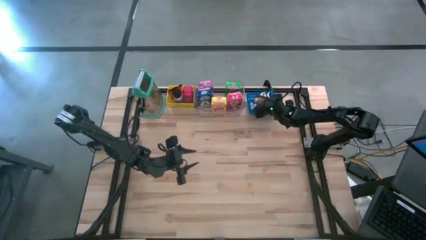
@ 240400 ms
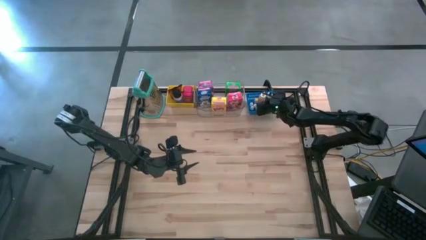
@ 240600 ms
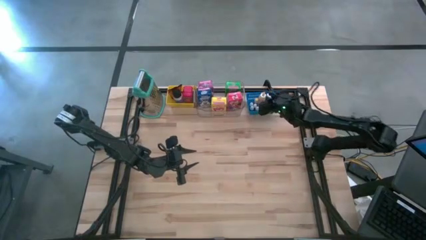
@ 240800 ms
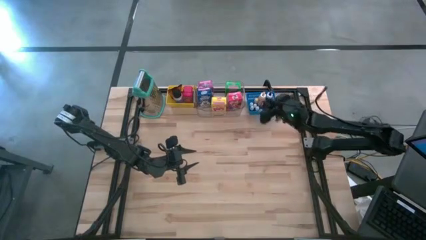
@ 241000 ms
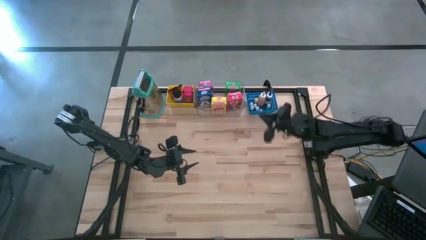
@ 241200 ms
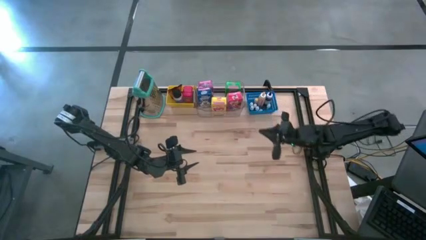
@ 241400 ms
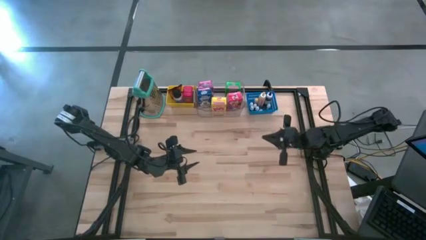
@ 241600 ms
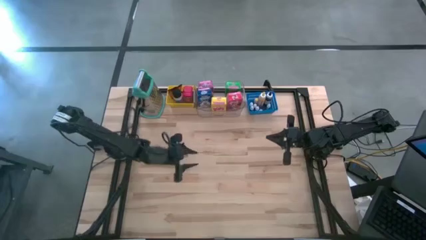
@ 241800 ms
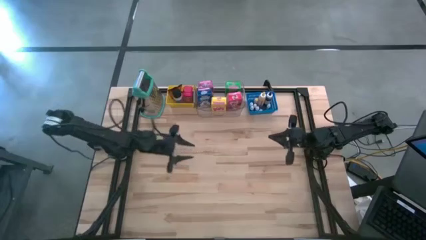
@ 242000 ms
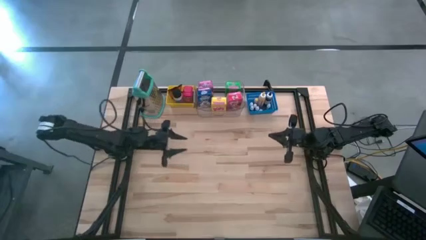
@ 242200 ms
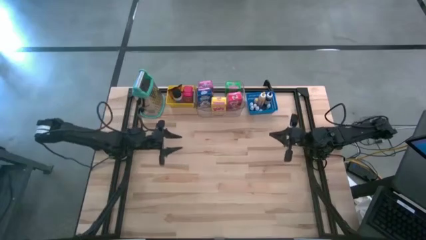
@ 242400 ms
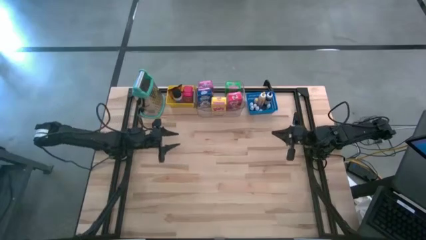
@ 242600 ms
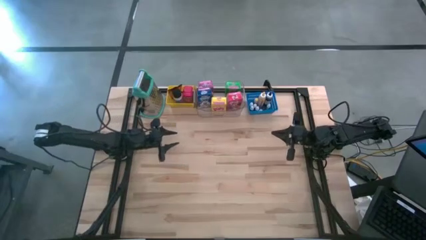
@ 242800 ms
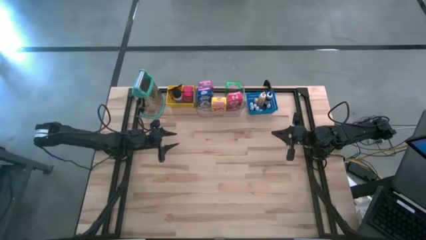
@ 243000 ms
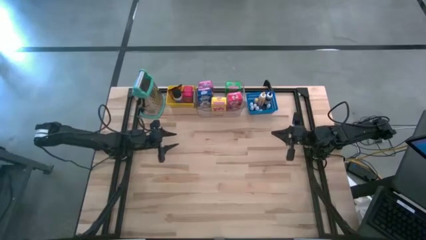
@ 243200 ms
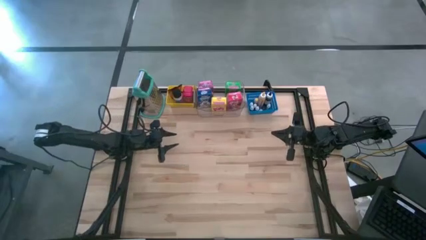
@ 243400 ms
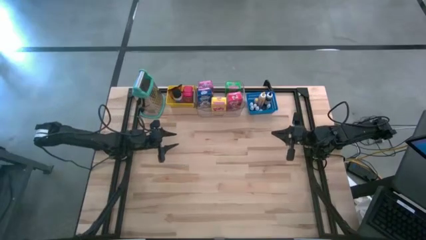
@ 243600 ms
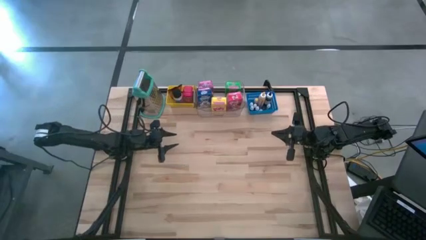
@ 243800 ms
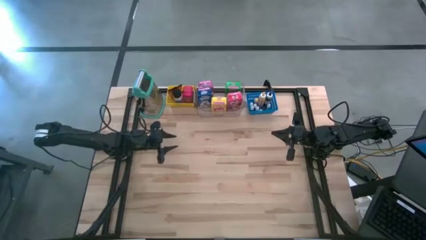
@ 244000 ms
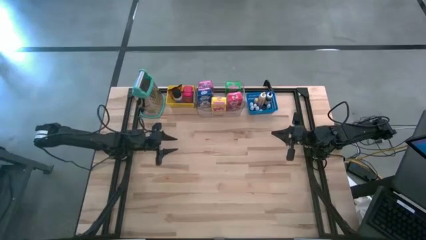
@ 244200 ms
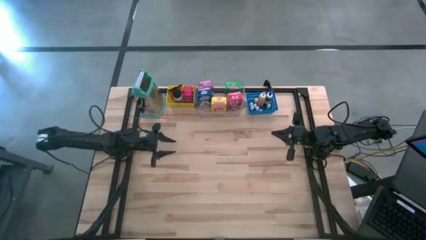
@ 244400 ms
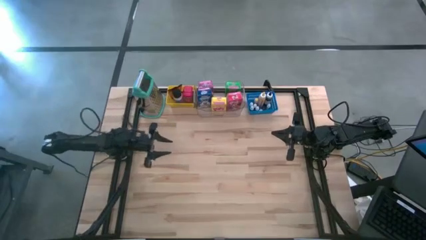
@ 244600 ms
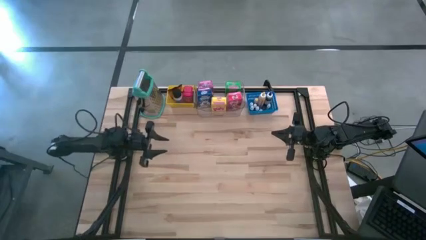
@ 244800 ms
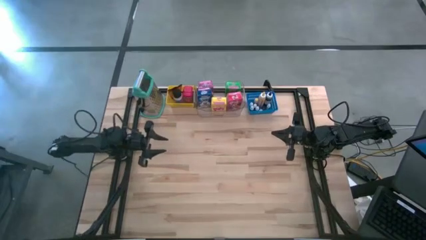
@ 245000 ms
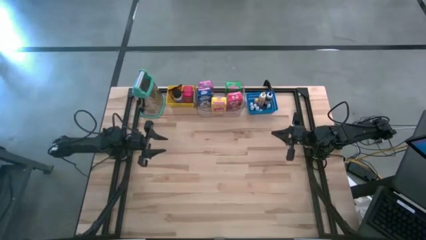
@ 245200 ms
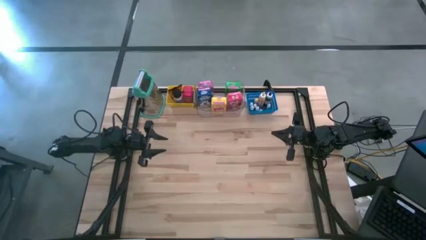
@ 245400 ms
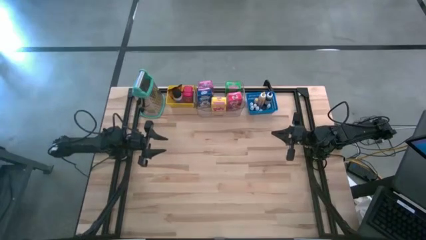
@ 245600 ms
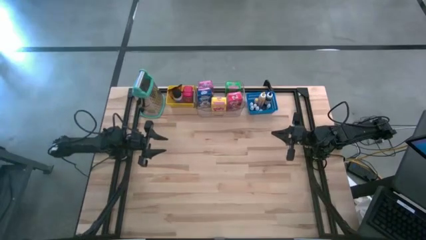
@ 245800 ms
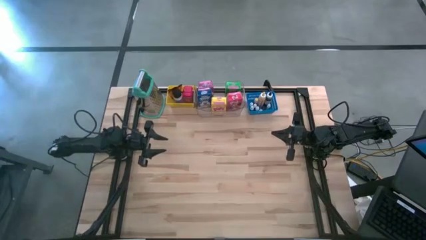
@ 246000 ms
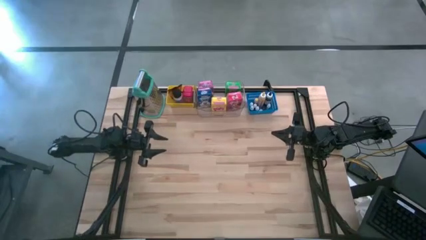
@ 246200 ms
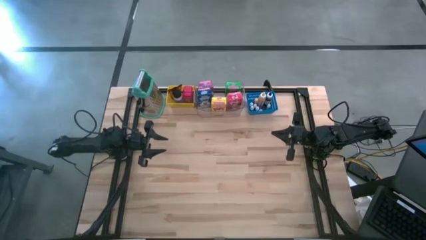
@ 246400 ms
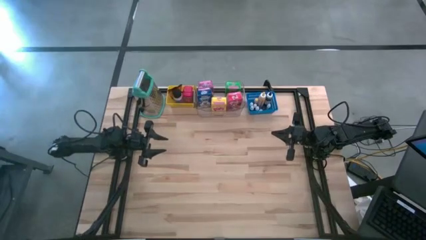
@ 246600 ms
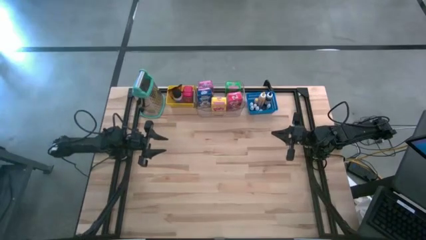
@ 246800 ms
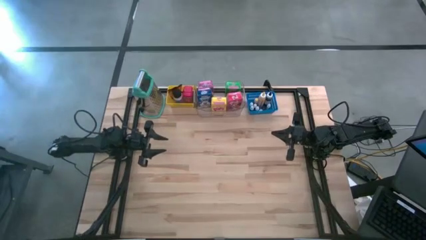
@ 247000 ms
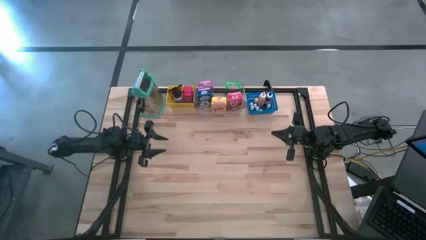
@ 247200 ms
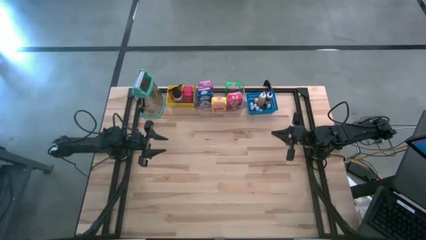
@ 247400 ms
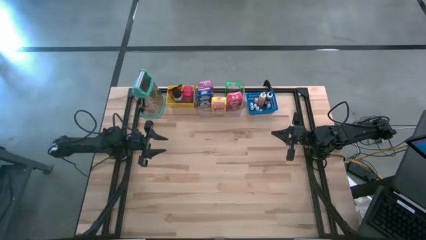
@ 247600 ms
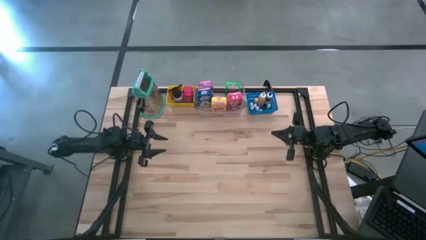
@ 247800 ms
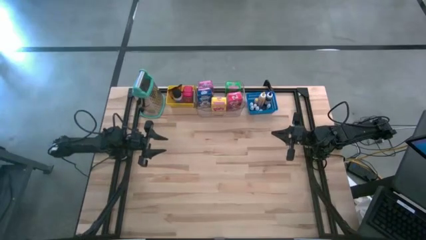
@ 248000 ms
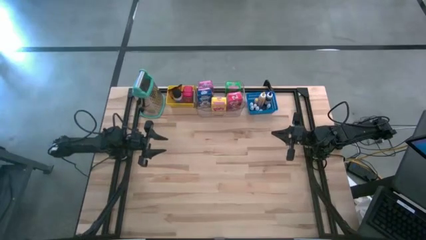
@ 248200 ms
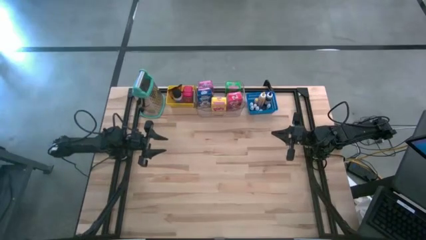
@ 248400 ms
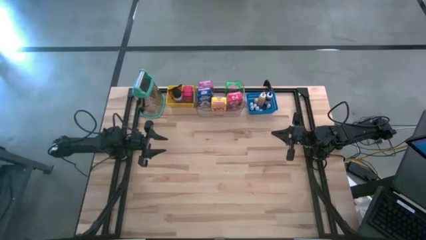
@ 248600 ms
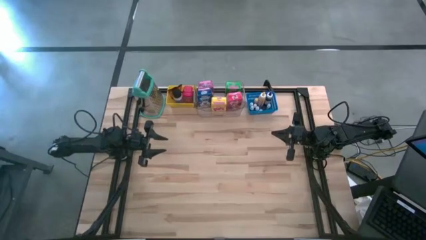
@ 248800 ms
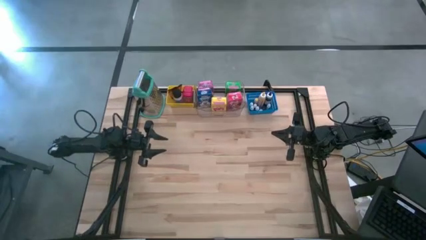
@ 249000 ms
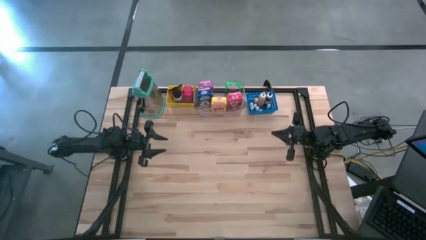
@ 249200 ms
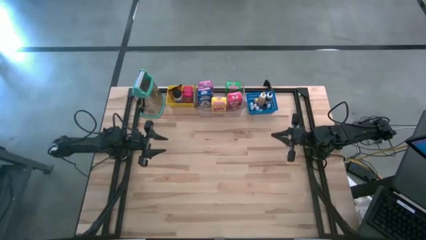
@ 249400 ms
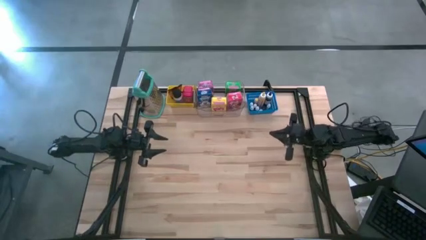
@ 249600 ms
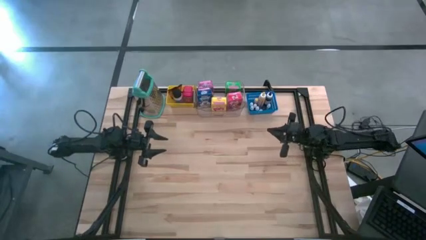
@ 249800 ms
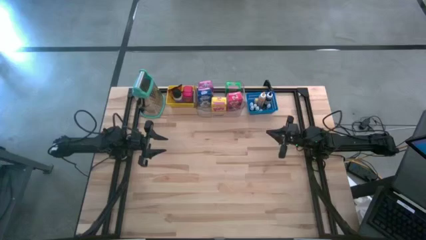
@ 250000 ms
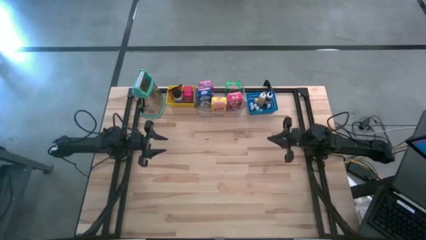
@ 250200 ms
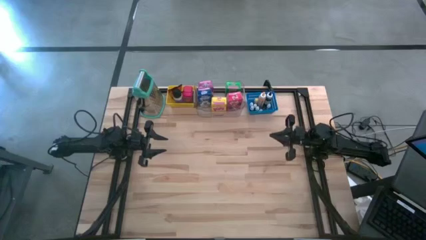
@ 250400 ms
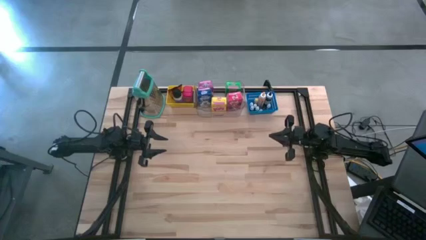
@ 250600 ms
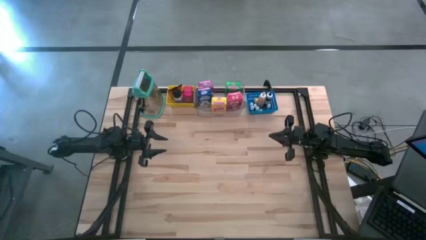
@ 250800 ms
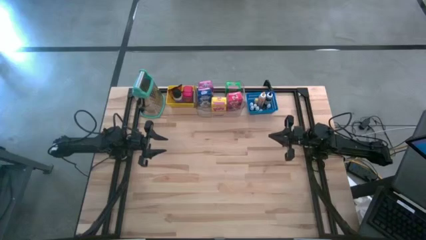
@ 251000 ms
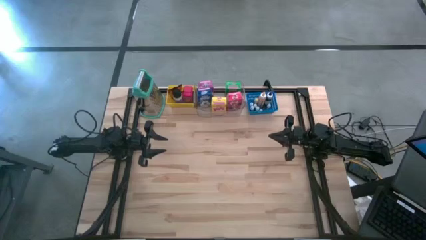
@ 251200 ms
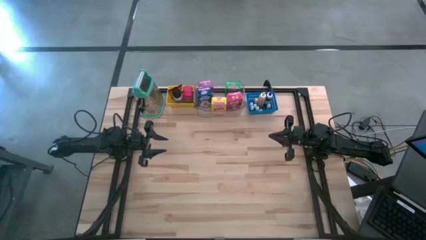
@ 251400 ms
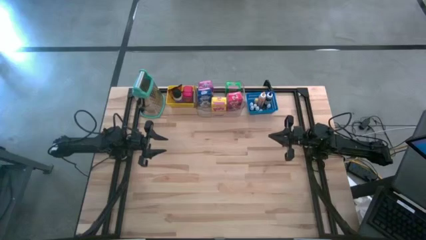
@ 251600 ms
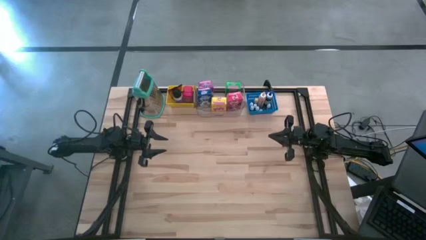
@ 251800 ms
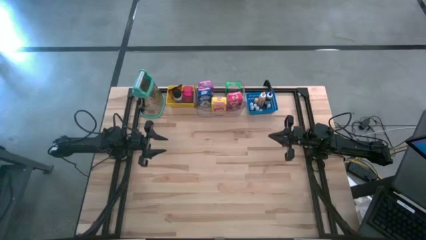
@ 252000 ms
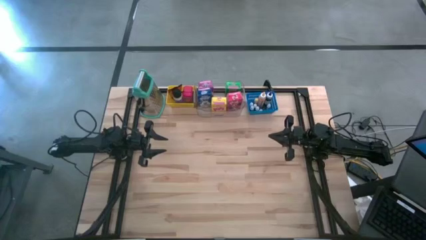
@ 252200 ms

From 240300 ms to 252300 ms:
Task: Pick & Place Kitchen Items
Return to Home Position
